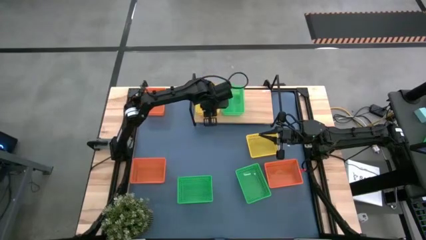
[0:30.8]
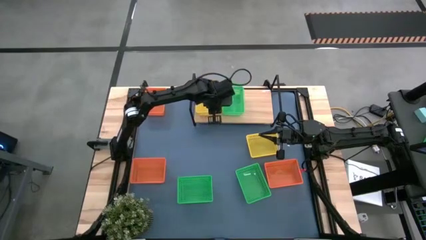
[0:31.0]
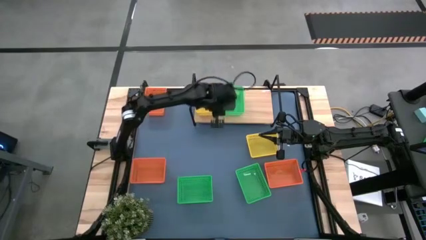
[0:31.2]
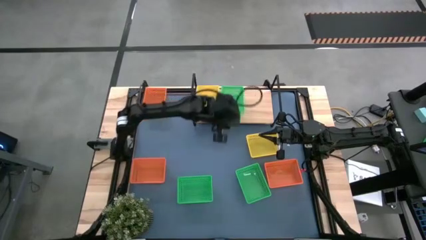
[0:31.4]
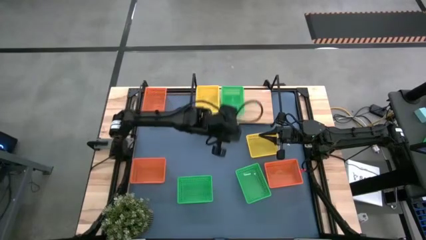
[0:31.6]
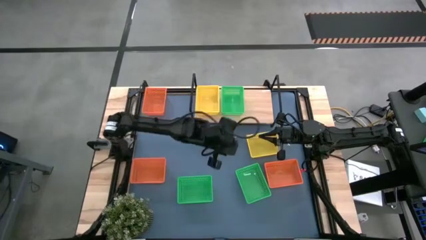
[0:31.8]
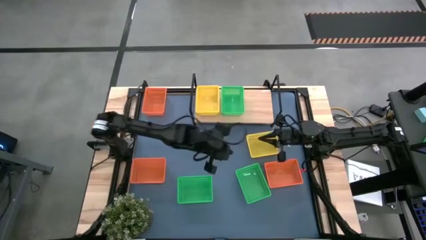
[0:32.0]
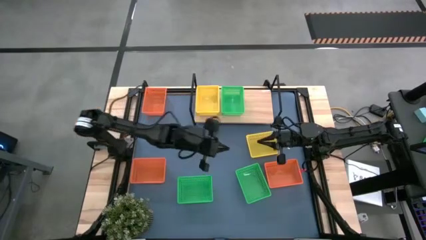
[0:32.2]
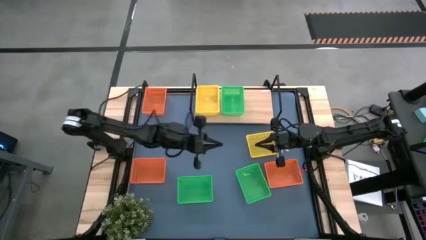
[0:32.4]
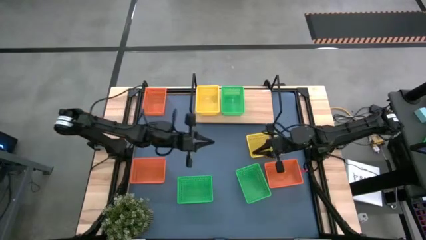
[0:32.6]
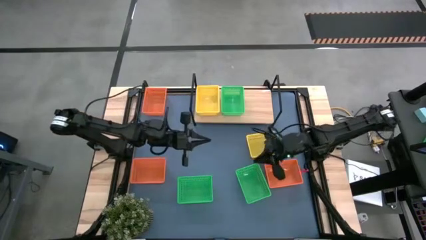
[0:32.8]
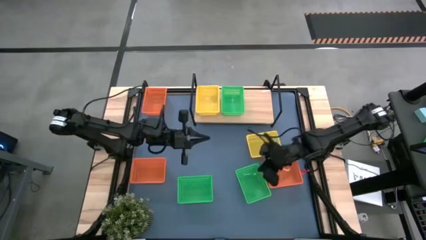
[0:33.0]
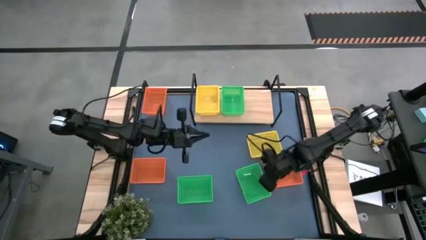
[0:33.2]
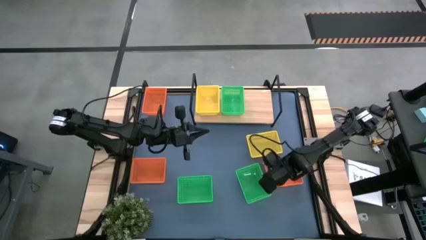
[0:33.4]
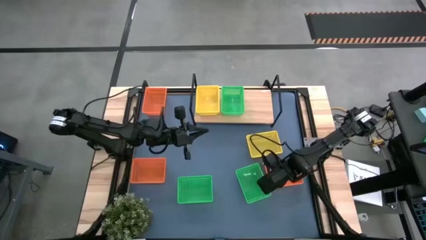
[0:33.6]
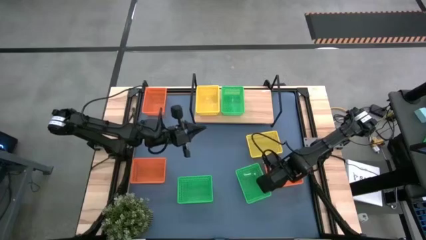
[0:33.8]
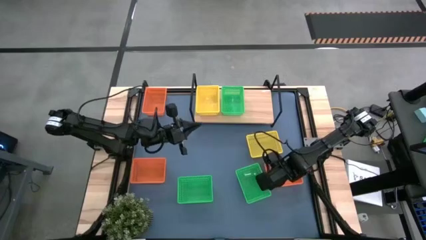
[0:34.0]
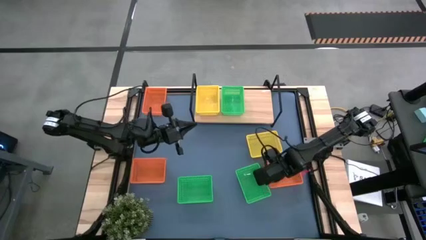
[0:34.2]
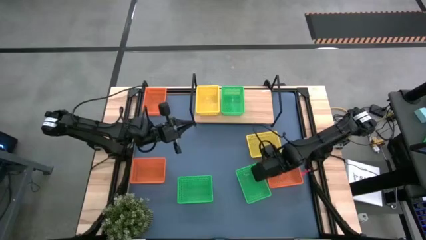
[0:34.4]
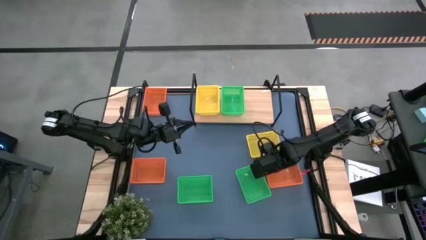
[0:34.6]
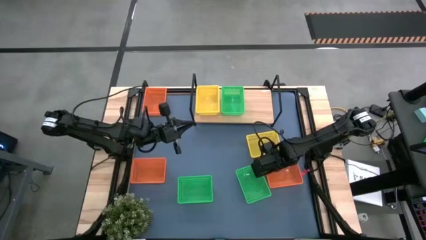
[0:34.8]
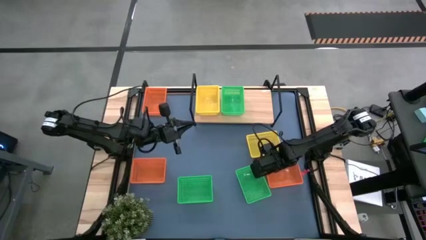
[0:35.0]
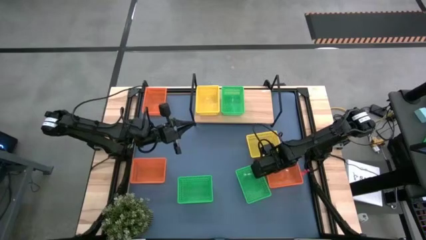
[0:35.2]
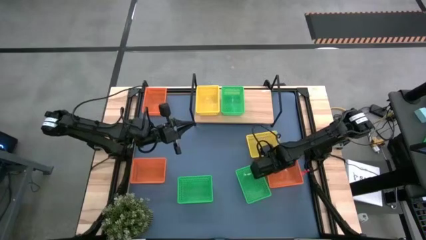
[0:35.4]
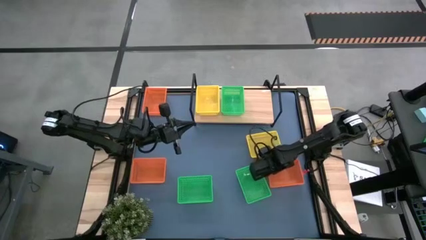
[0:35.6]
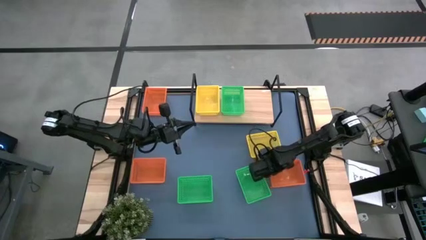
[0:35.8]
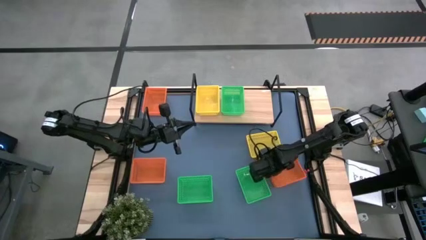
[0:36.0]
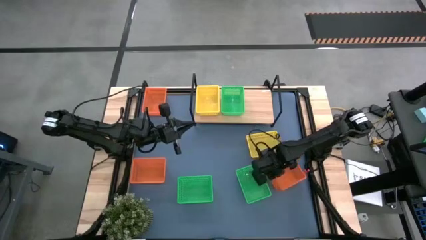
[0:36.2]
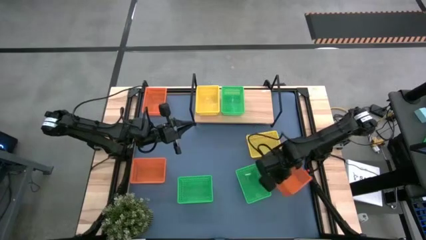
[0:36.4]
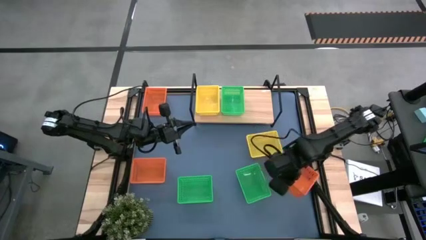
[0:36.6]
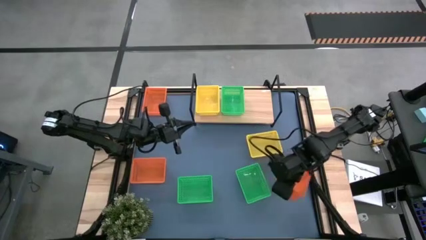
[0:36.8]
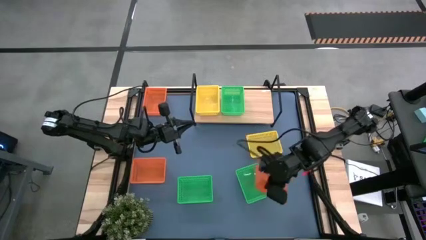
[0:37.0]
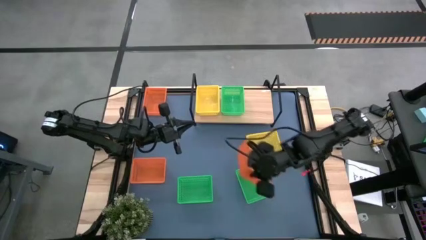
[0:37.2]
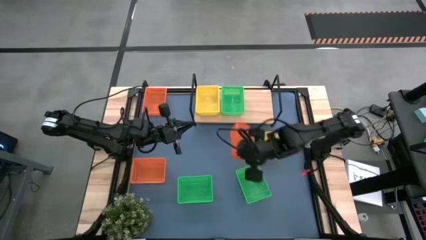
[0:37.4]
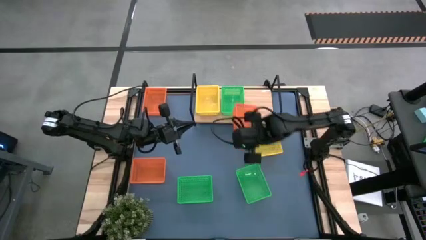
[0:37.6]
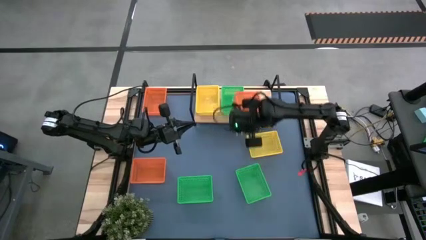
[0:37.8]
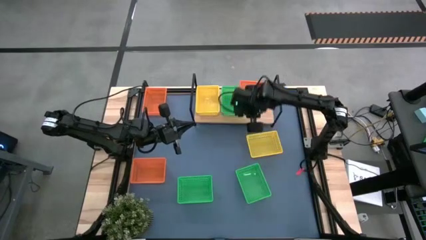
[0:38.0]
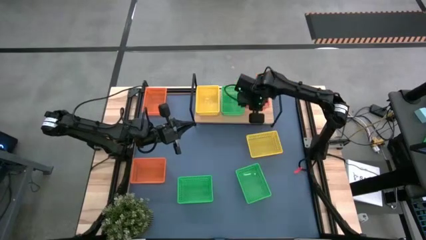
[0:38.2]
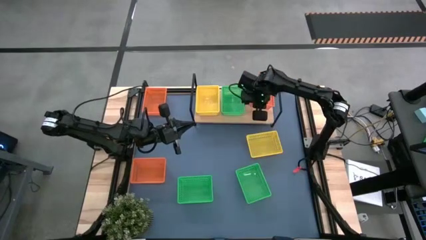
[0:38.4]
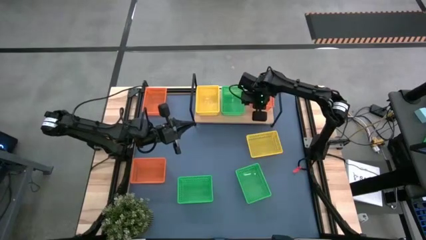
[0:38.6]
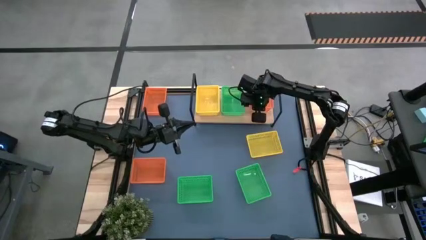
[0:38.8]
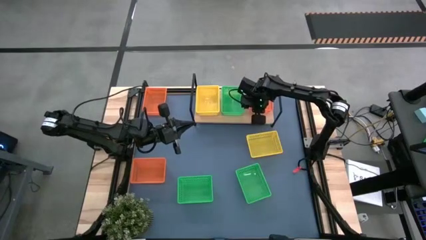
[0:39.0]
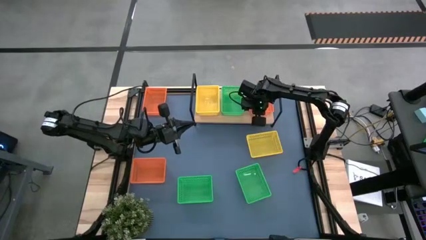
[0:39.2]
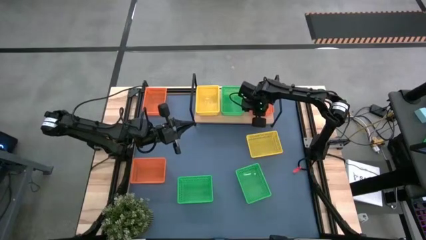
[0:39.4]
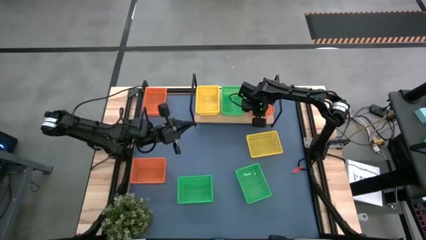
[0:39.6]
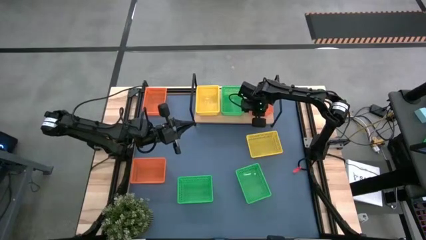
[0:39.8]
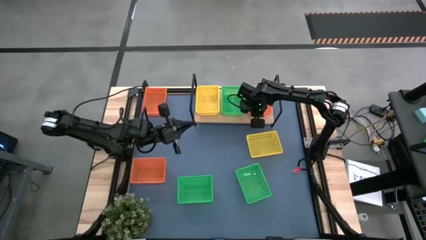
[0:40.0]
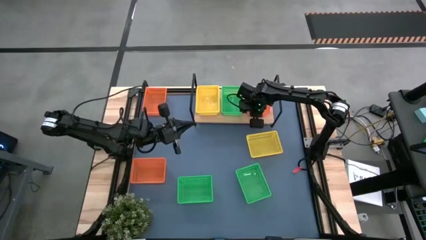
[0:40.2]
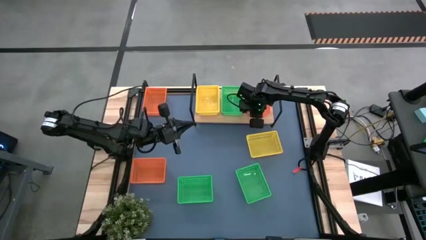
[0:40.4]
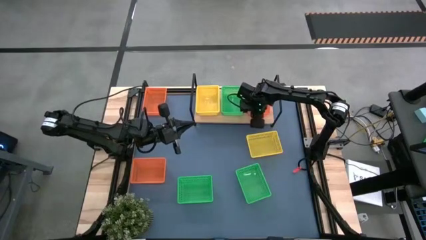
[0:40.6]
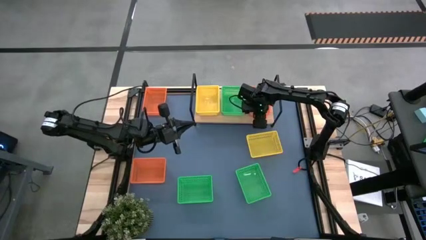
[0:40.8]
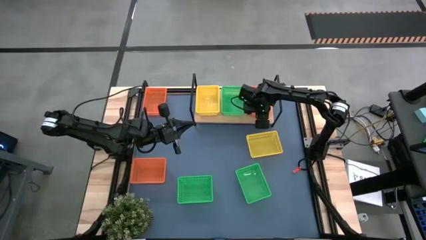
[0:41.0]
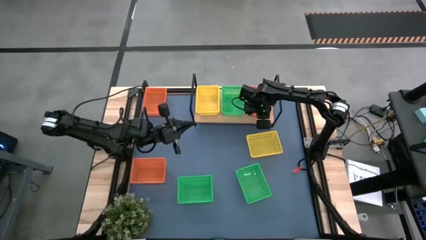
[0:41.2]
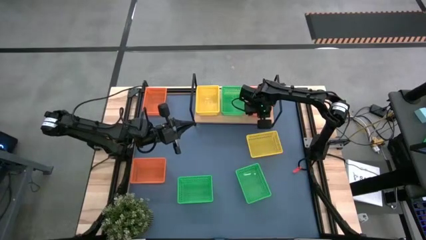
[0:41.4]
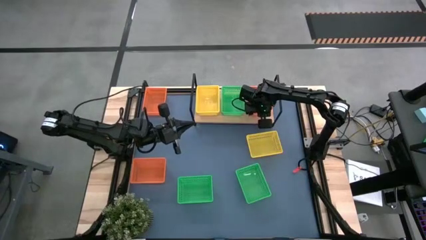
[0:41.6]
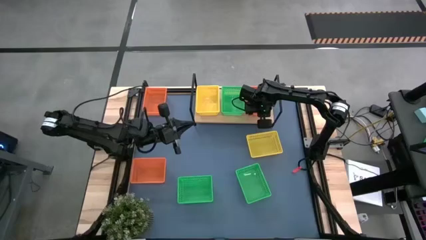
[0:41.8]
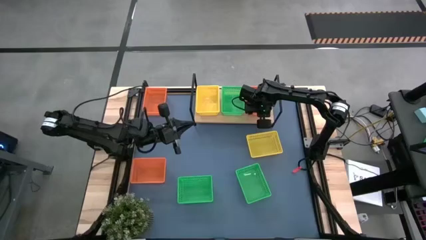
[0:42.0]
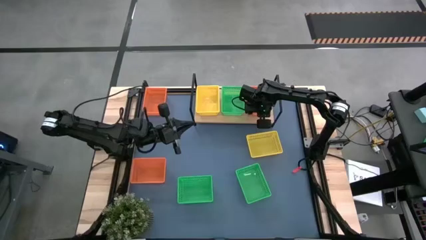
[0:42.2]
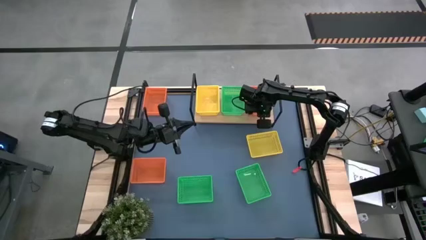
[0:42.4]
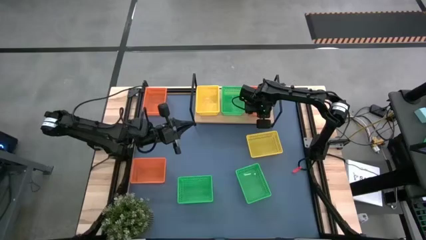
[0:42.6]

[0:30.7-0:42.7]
Task: Stack baskets on shelf by color
Put the bottom right orange bin on the shelf
